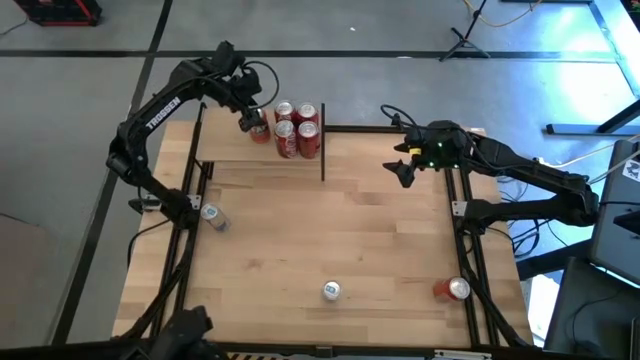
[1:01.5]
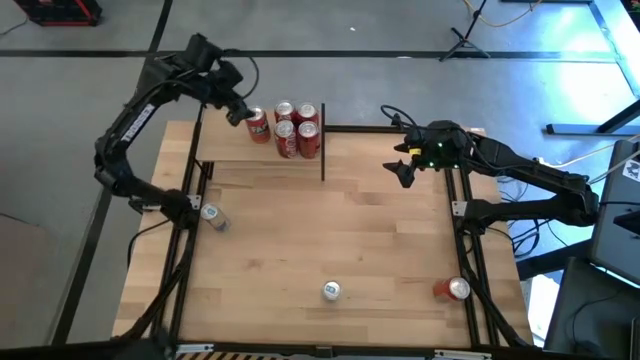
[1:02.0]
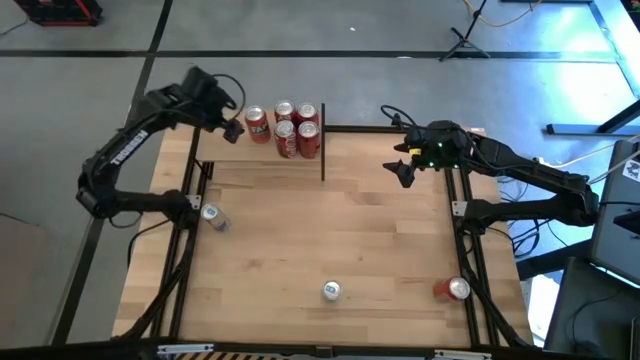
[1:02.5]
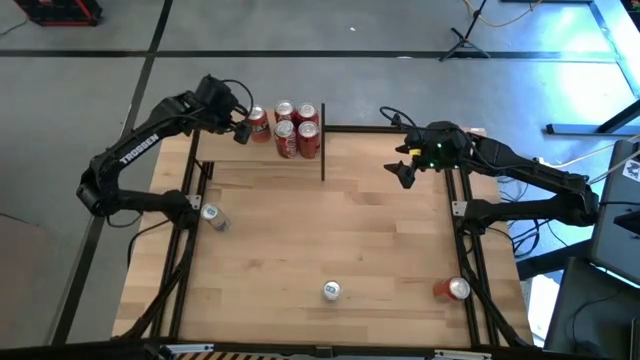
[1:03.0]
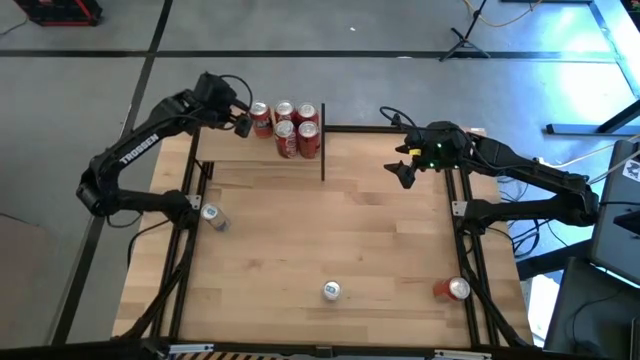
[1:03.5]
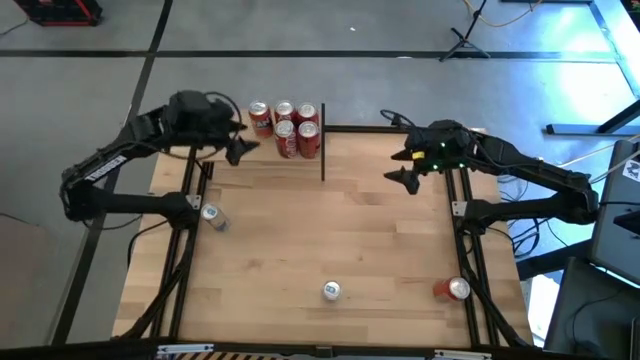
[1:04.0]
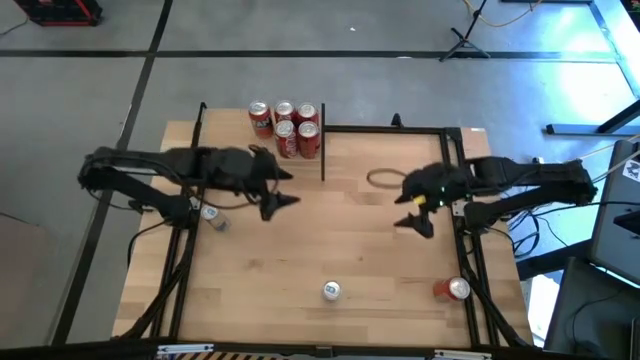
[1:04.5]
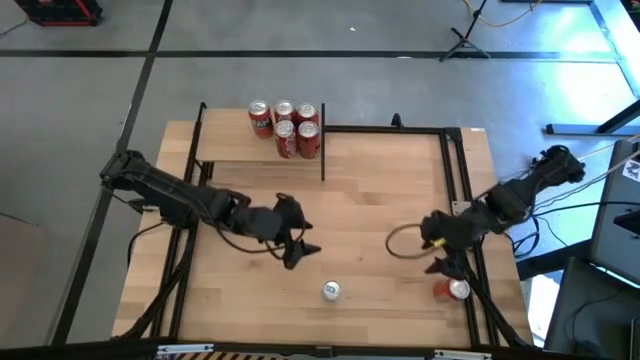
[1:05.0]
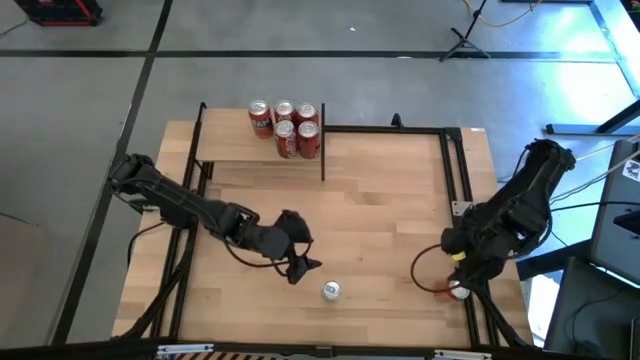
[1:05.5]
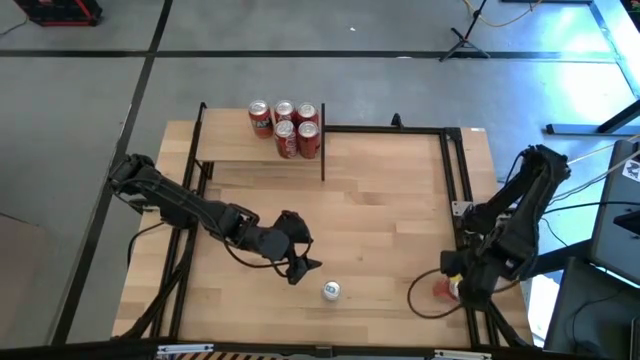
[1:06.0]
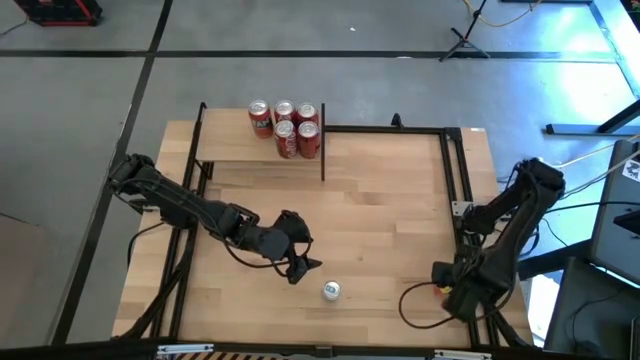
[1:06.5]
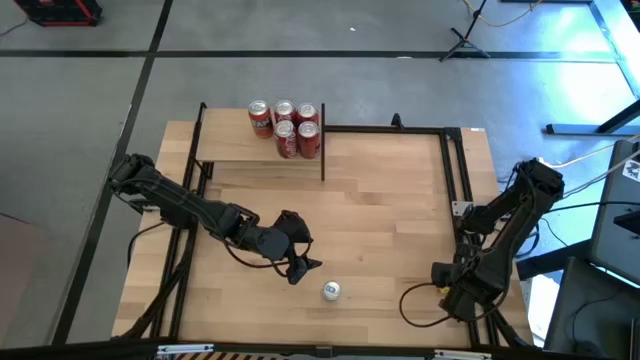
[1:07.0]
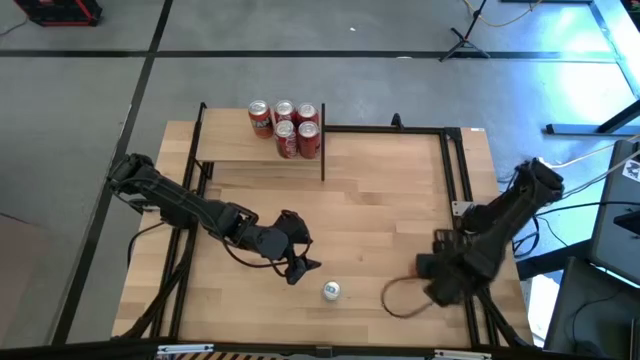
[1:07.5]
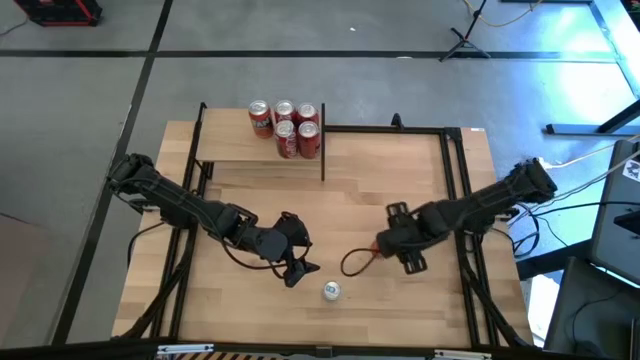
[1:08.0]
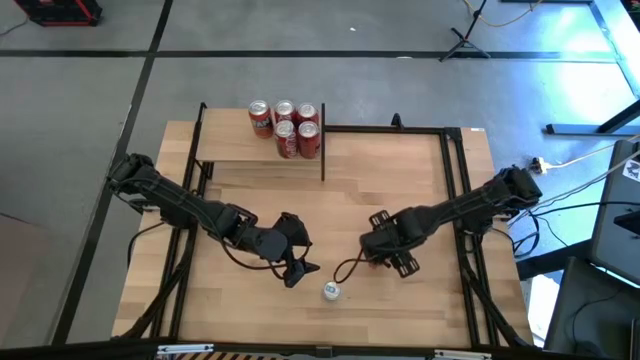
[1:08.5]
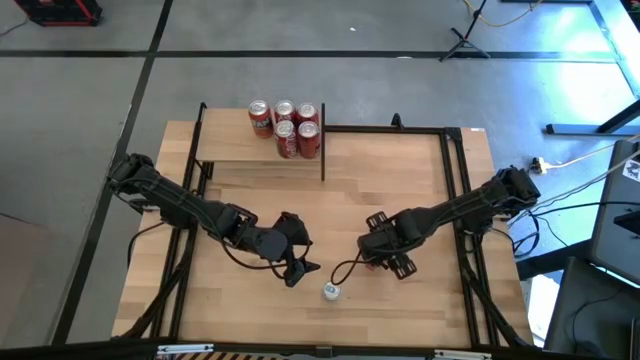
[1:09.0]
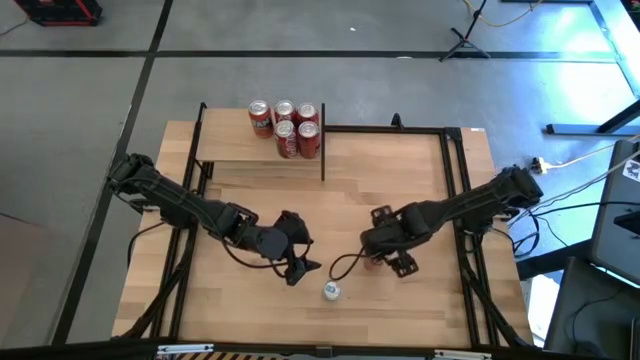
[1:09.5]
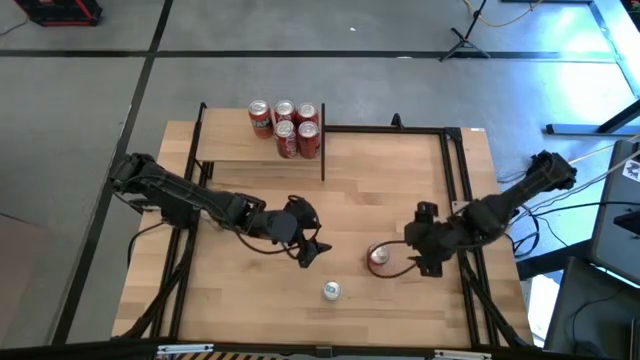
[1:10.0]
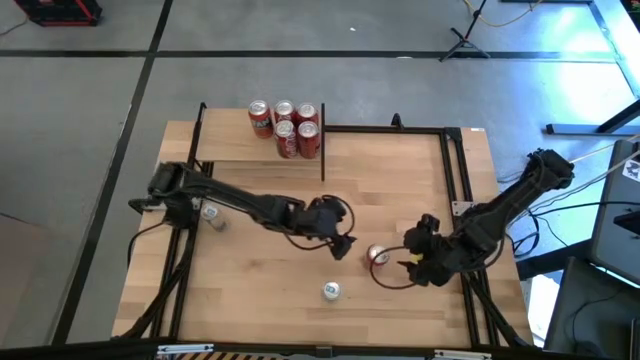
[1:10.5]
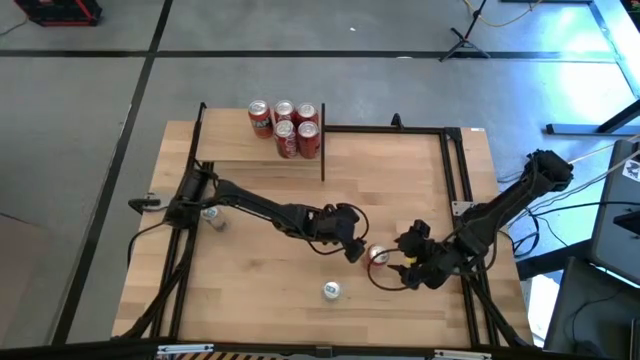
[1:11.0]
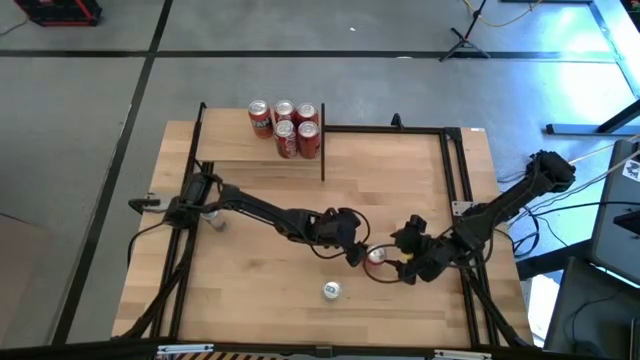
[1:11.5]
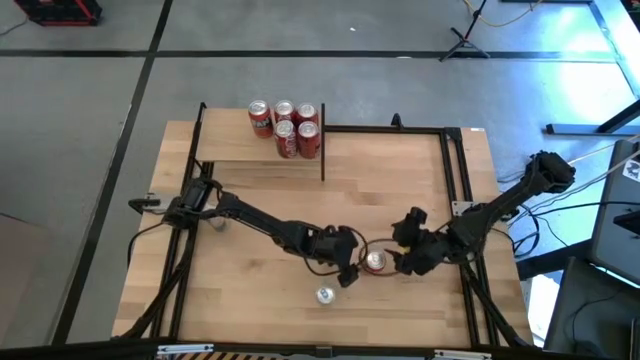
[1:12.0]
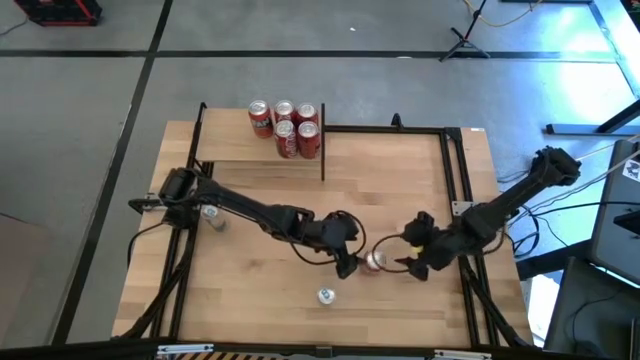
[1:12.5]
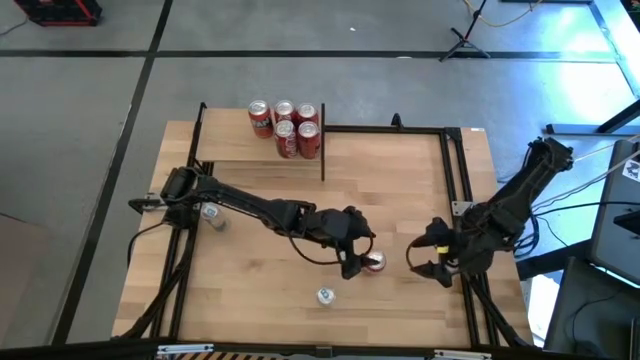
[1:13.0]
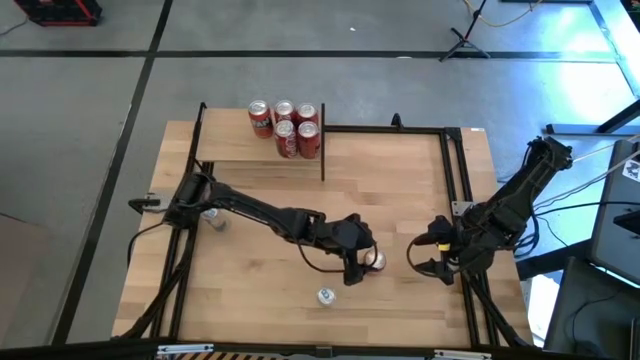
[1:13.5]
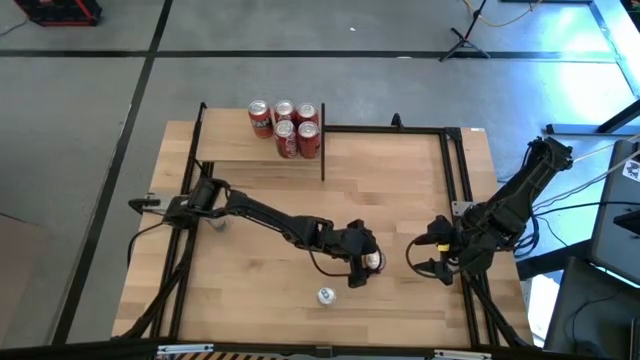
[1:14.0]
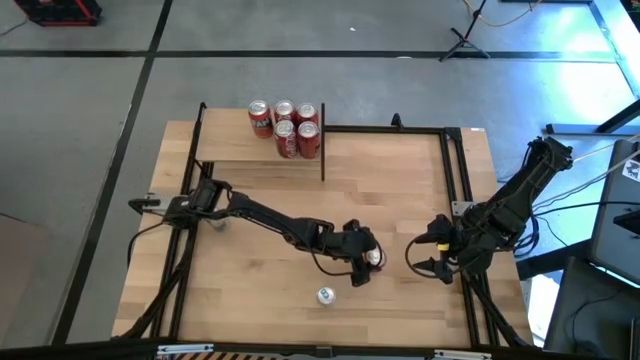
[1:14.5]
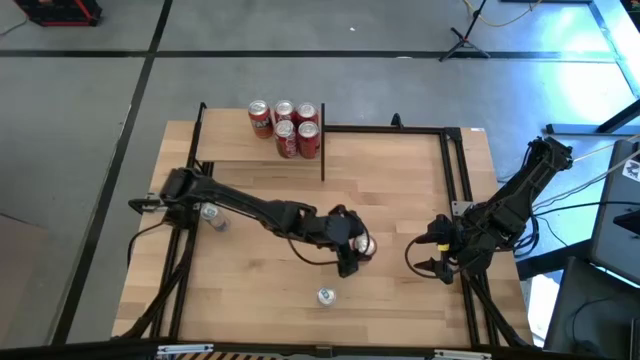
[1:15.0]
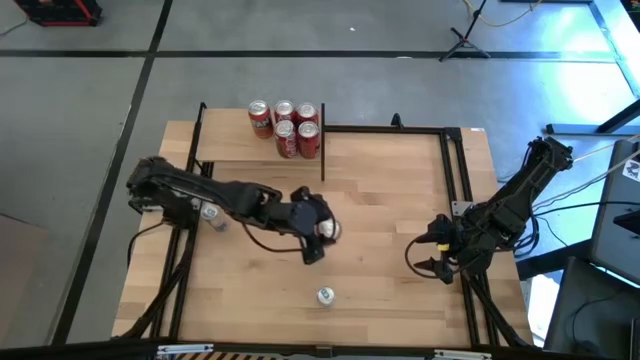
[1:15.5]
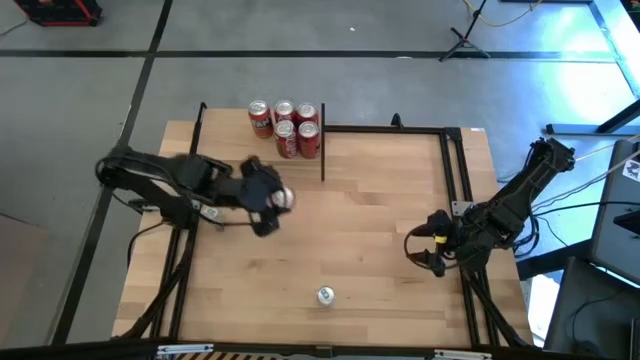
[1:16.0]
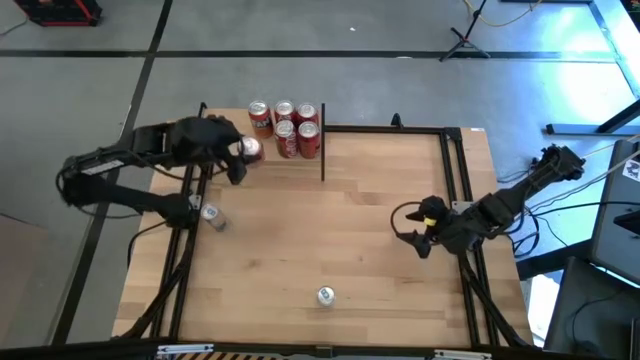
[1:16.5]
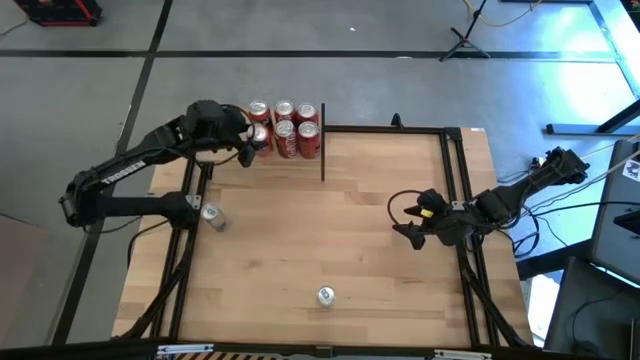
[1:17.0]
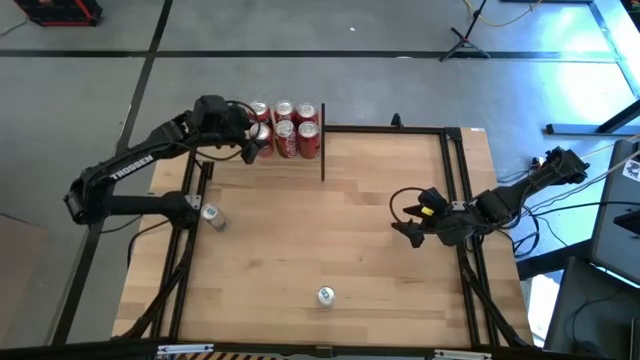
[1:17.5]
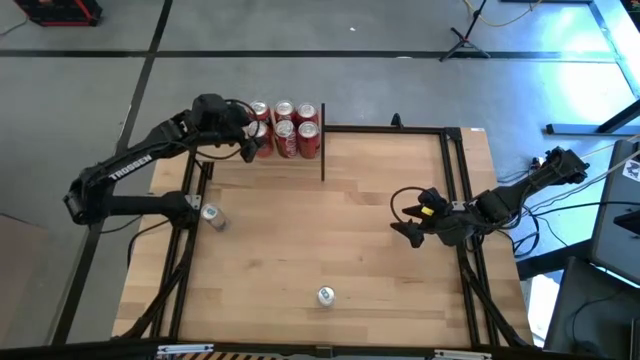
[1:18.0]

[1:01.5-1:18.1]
Task: Place canned beverage on shelf
Put the red soda can on the shelf aligned with the other red soda can

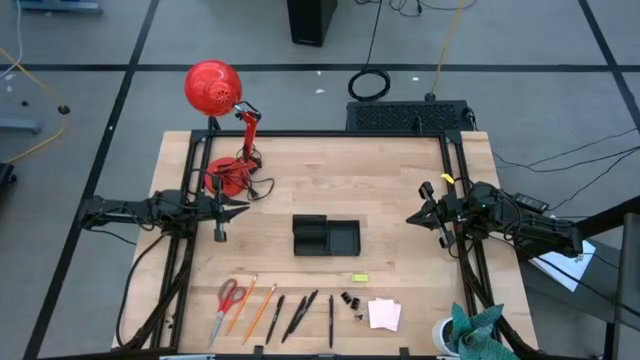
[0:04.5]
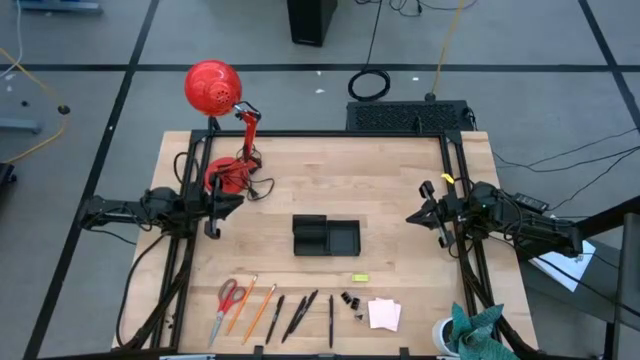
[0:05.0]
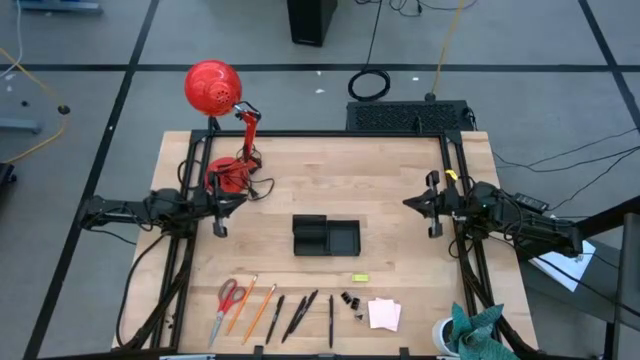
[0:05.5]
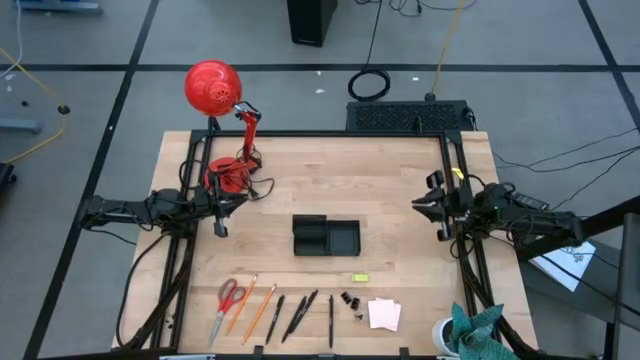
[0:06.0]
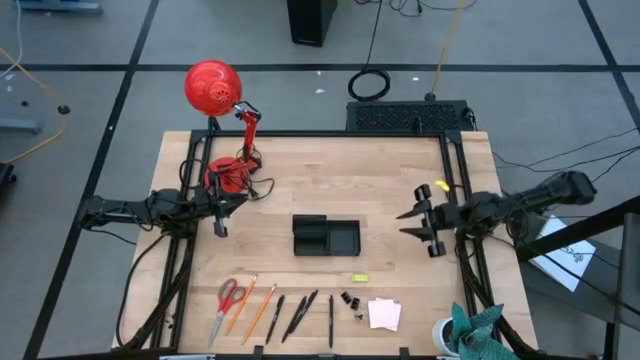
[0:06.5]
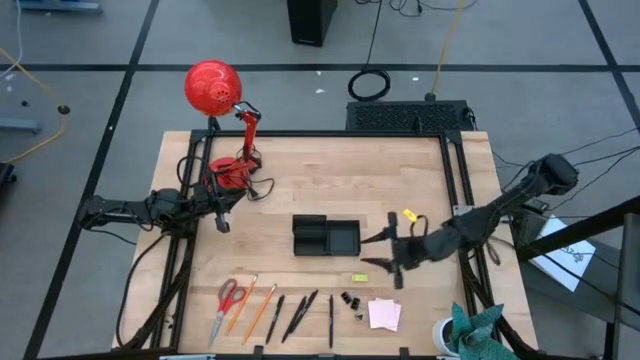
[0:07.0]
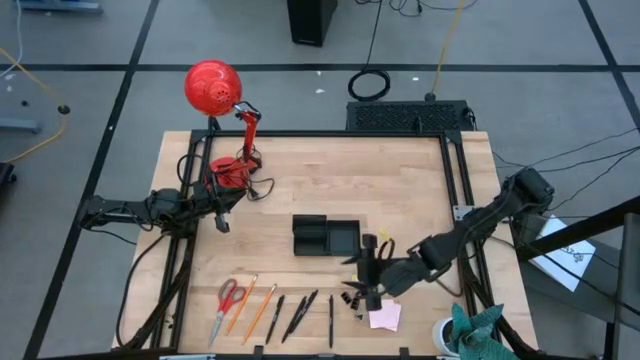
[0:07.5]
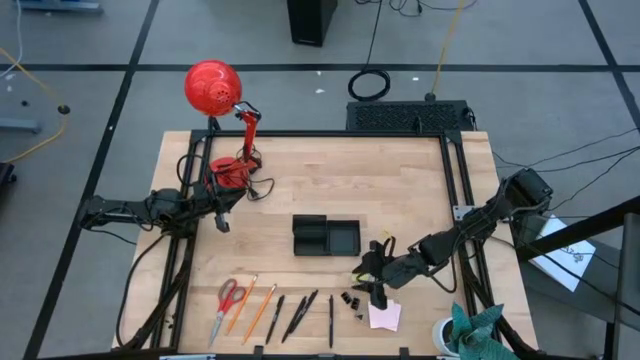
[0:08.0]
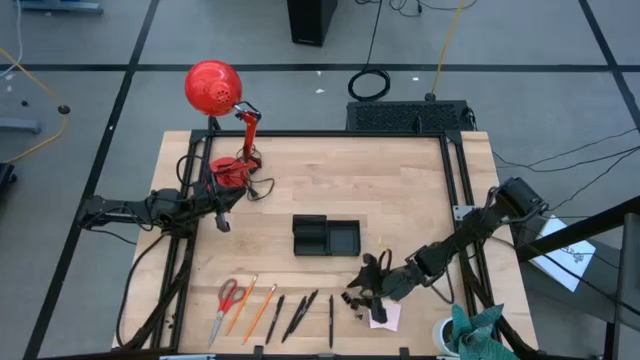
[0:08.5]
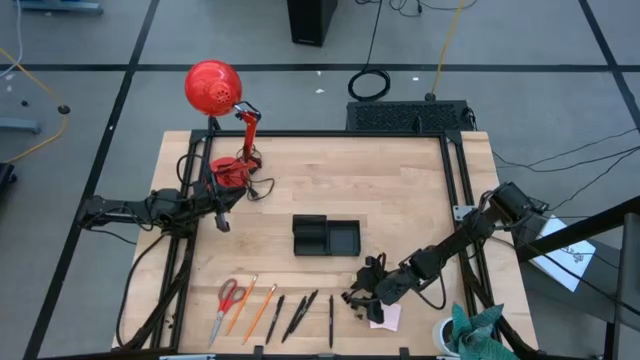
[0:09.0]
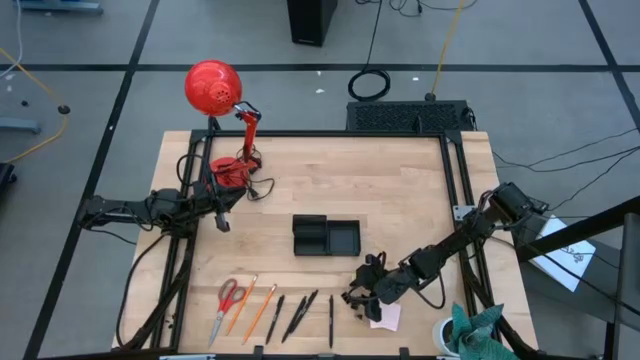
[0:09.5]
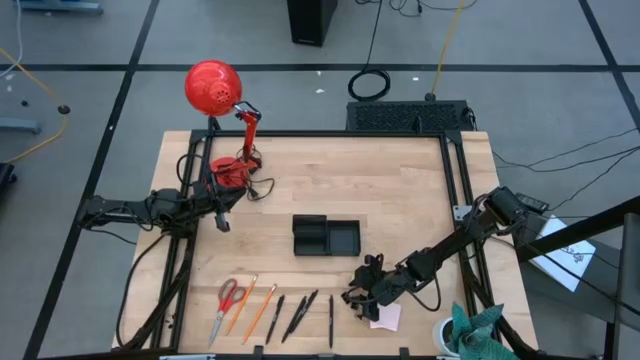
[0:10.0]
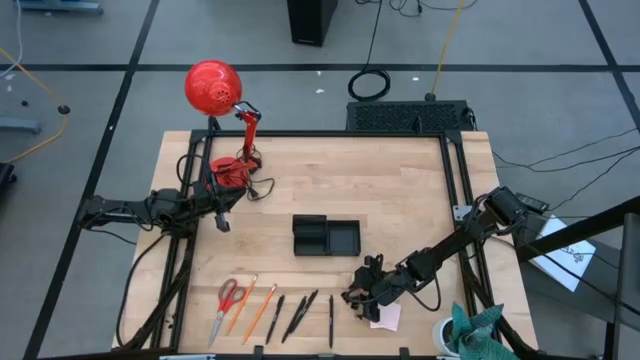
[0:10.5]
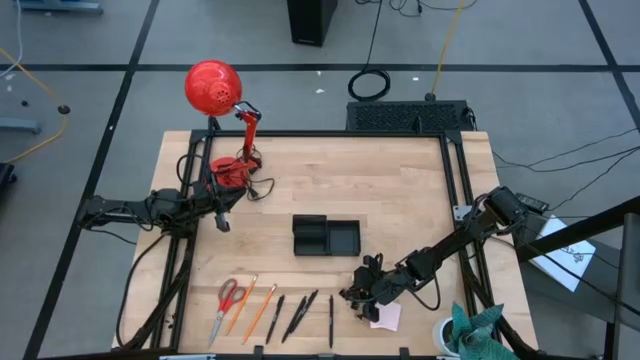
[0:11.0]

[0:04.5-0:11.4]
Task: Pick and place office supplies into organizer
Put the top binder clip into the desk organizer
